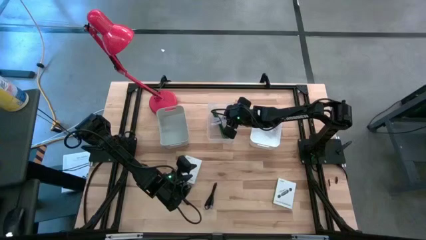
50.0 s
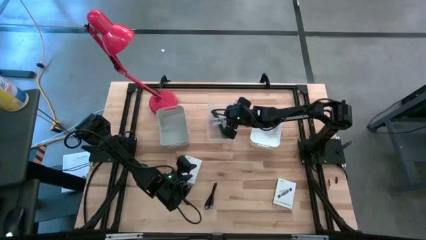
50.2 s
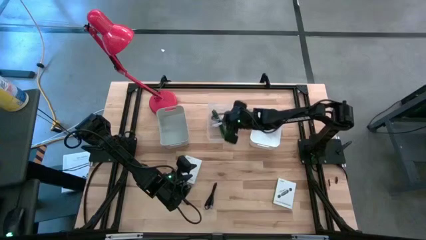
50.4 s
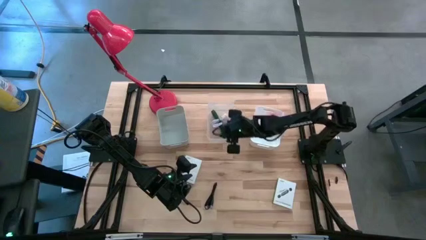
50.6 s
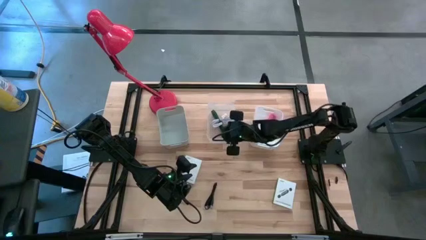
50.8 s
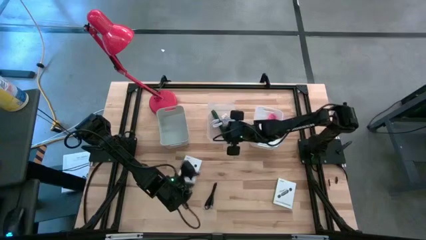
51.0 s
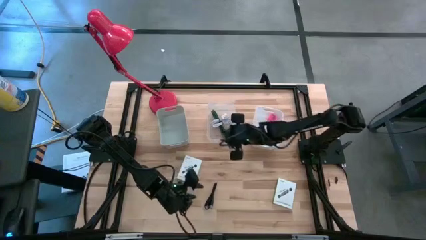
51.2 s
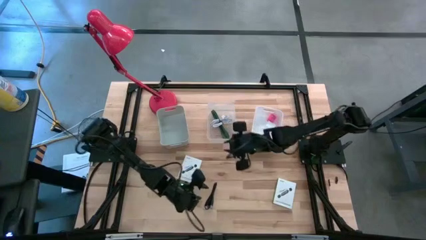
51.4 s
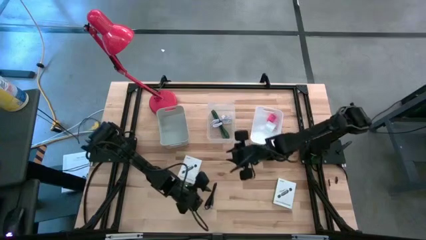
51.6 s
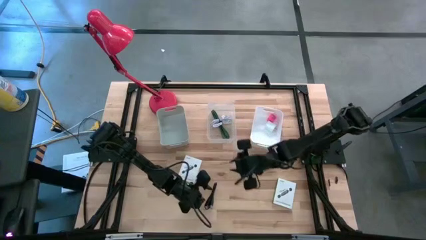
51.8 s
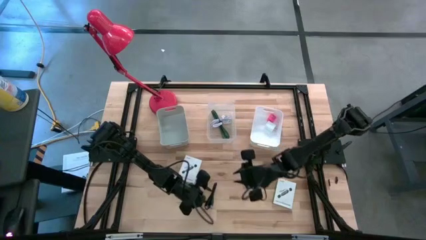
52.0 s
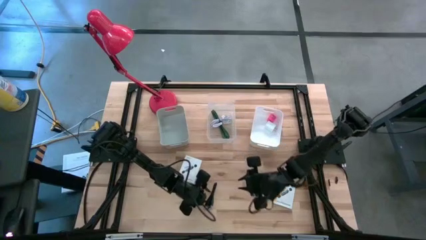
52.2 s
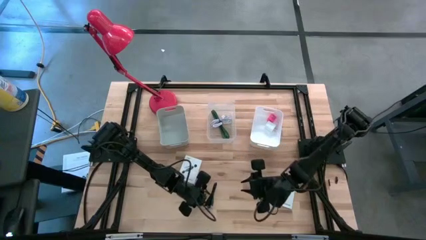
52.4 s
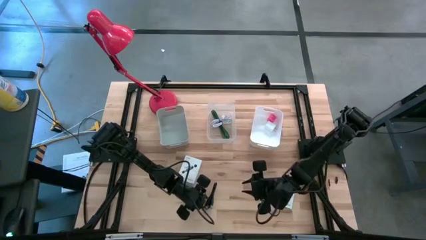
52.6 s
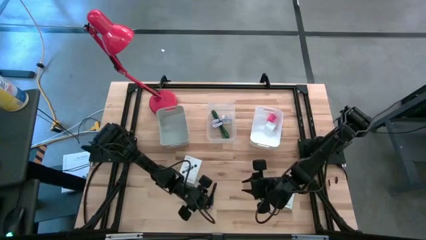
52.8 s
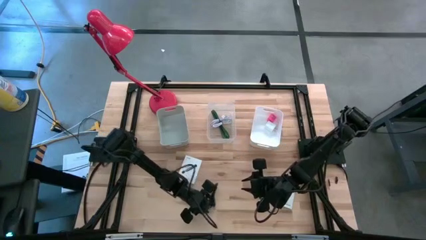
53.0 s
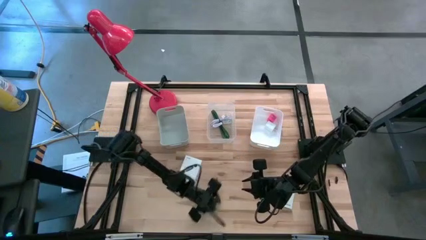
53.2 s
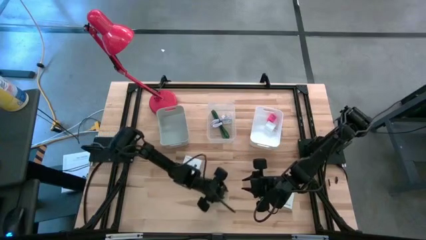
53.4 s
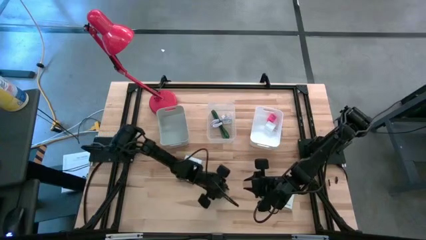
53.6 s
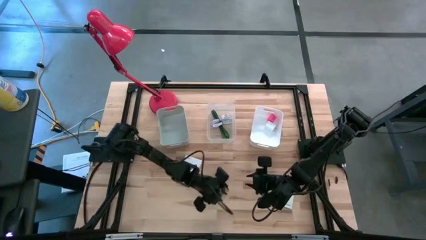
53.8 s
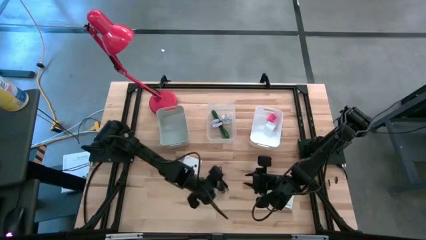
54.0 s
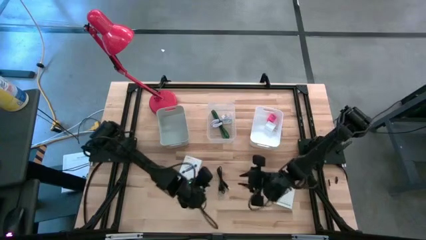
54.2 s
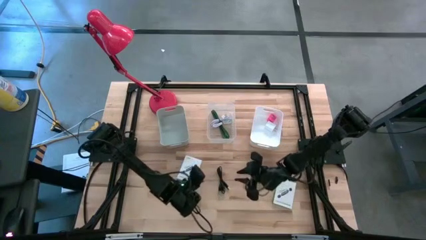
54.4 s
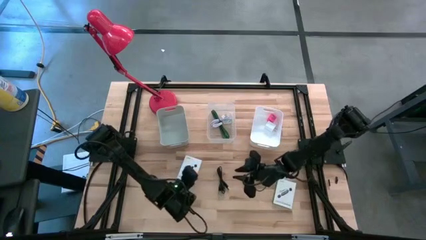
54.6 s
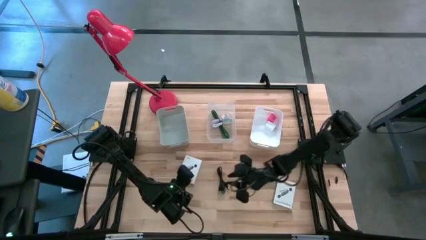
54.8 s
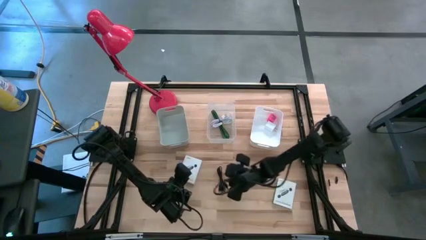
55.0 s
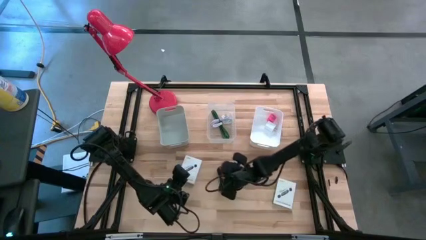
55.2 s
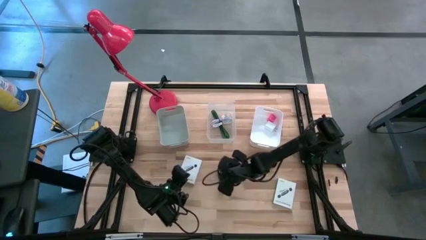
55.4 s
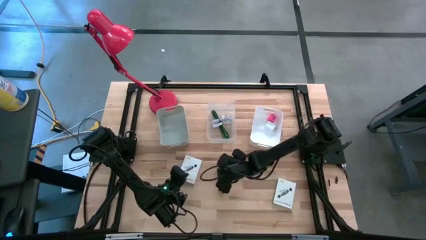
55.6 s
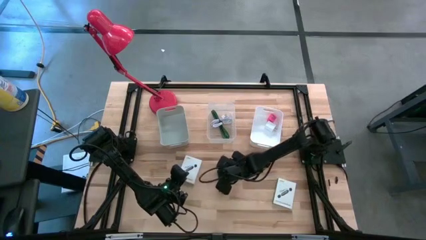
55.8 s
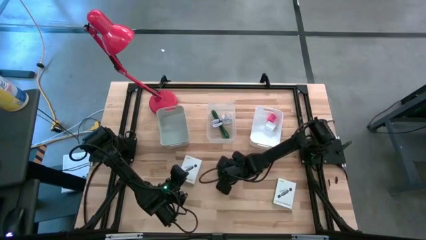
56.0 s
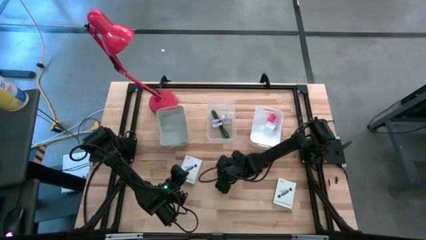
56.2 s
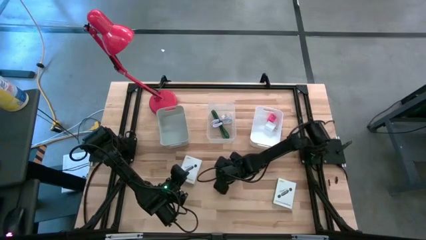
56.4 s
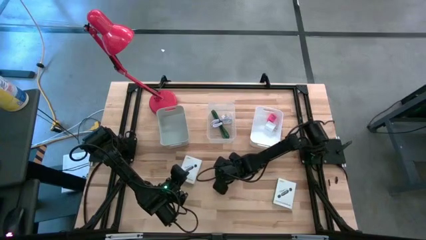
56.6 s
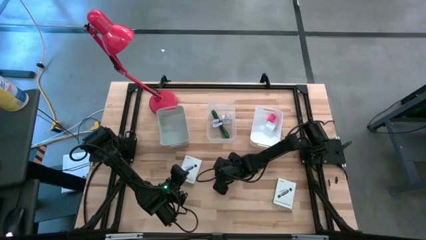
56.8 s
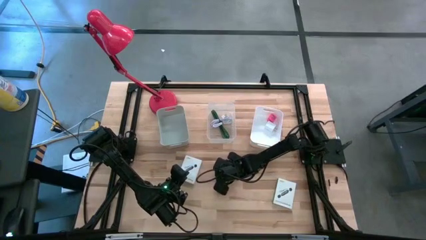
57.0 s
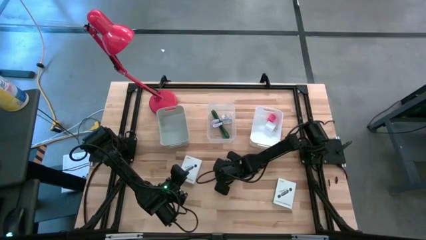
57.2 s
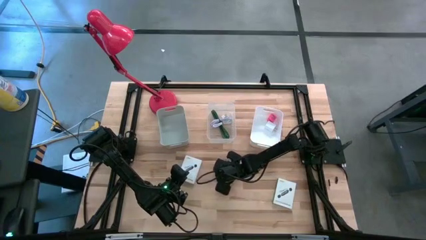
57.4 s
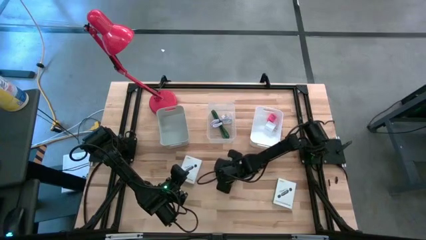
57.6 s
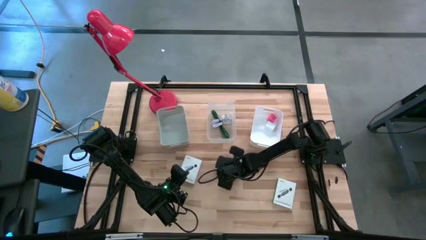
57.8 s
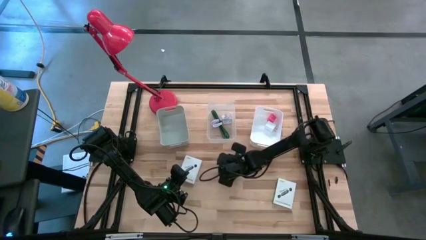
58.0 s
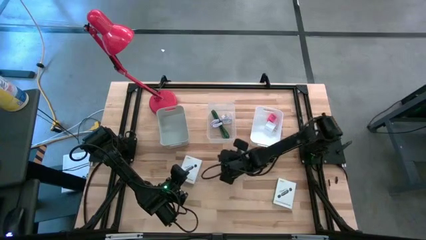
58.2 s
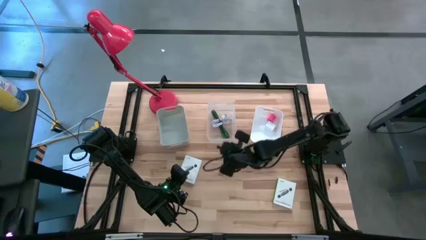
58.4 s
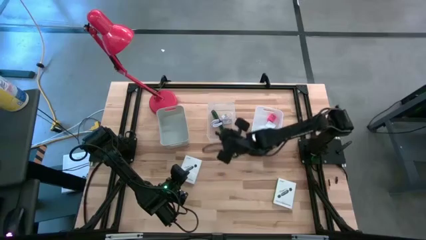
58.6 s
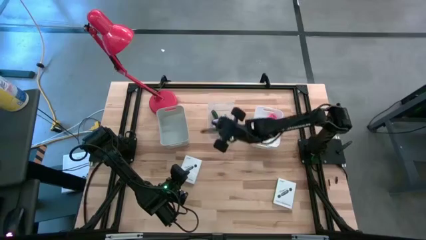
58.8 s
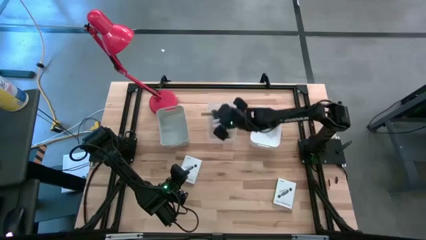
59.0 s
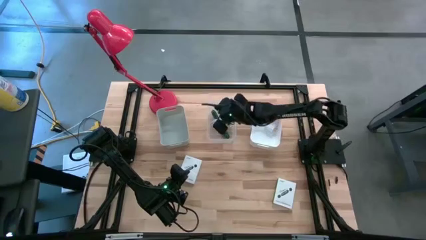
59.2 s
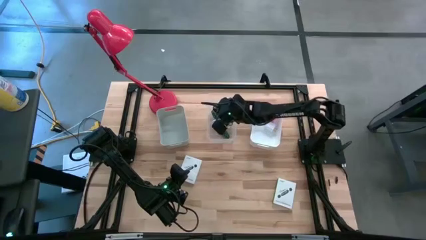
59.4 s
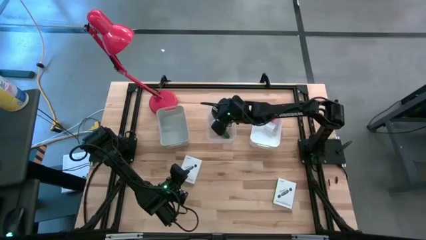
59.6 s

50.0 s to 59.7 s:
Task: Pick and place items into bin
Put the black USB cable into the transparent bin

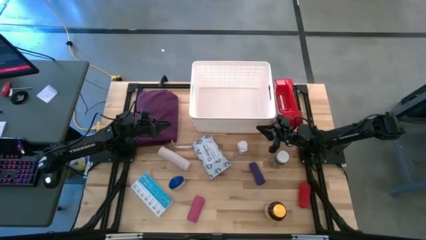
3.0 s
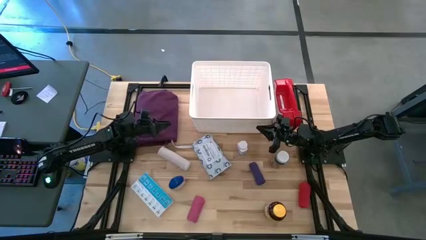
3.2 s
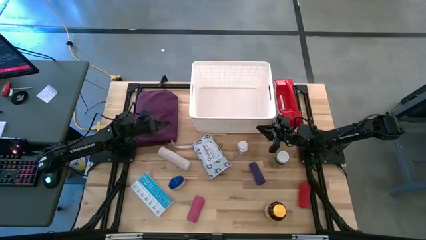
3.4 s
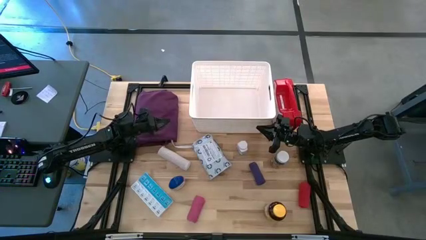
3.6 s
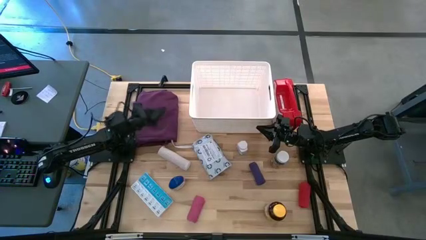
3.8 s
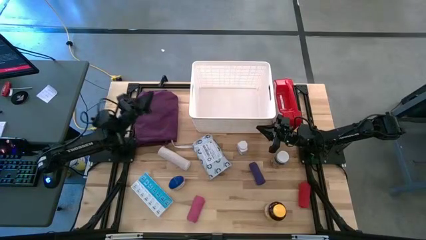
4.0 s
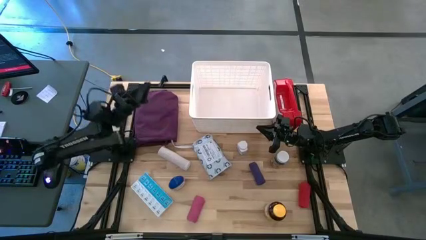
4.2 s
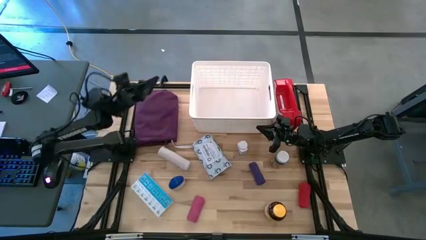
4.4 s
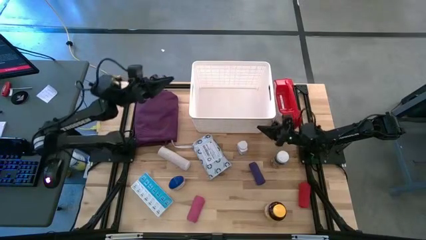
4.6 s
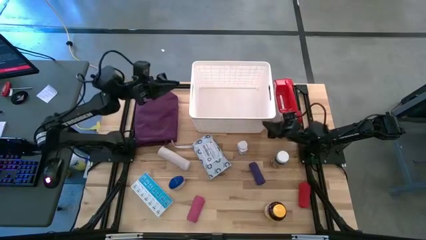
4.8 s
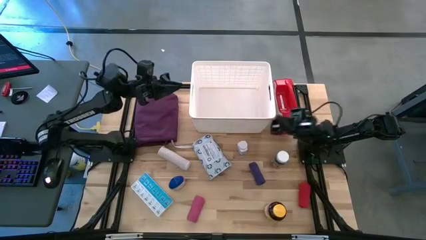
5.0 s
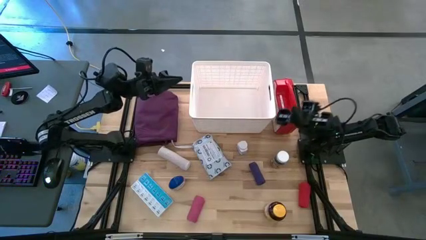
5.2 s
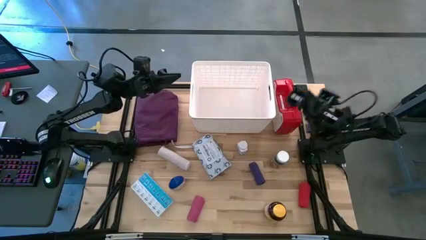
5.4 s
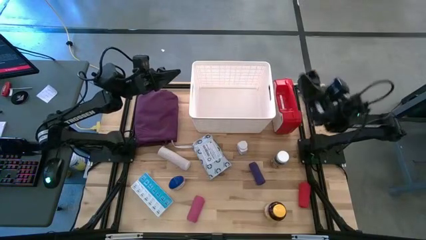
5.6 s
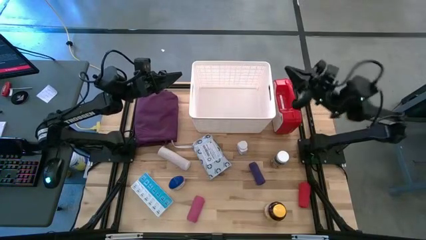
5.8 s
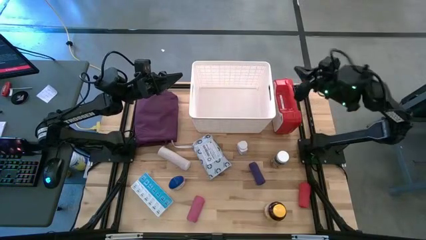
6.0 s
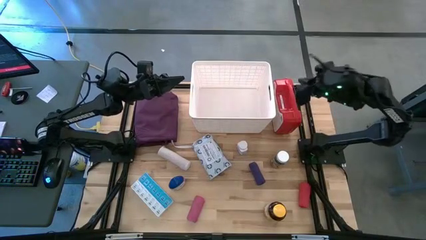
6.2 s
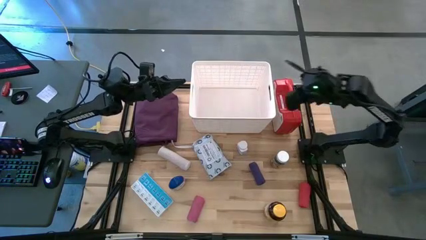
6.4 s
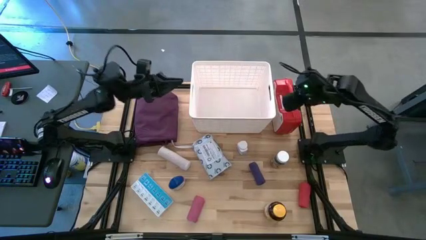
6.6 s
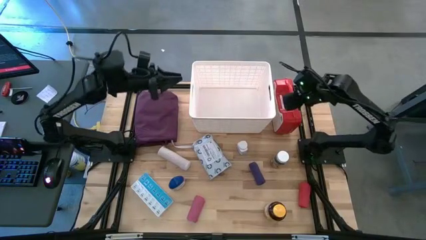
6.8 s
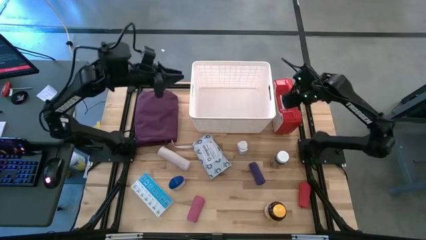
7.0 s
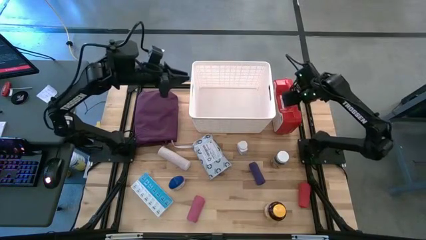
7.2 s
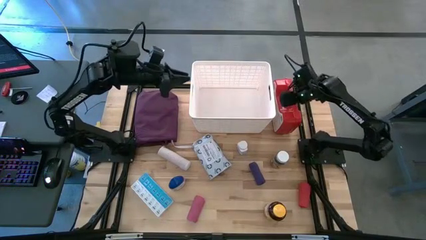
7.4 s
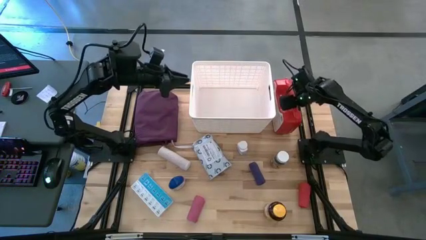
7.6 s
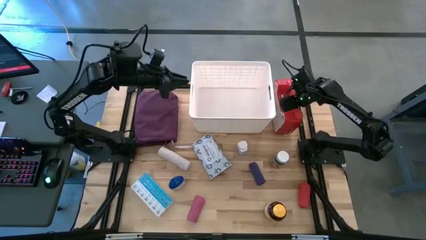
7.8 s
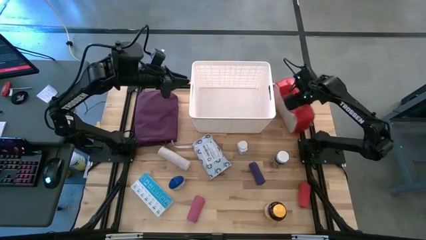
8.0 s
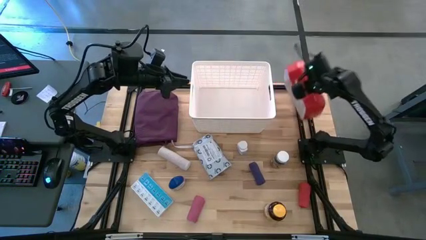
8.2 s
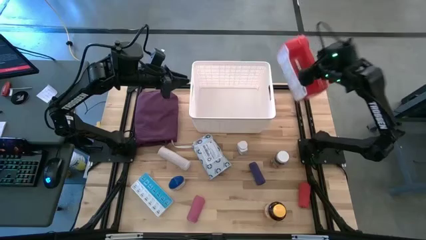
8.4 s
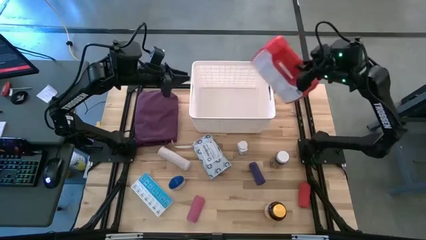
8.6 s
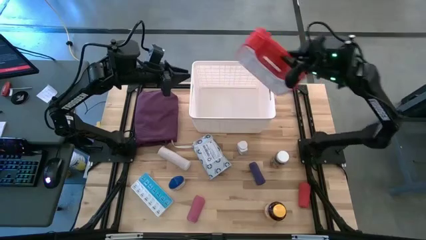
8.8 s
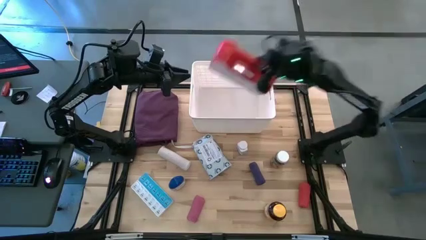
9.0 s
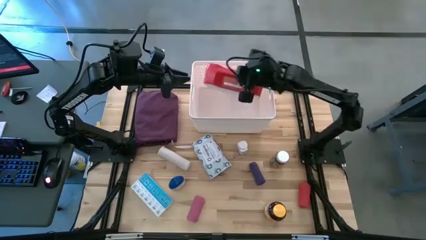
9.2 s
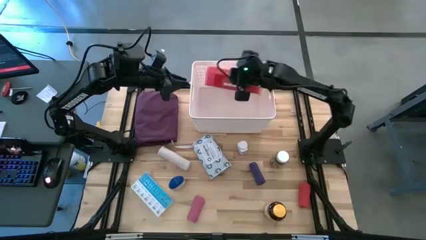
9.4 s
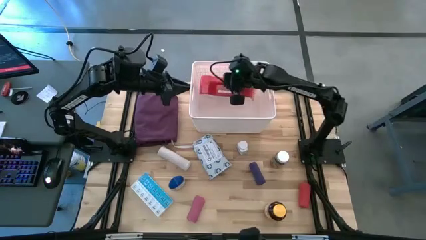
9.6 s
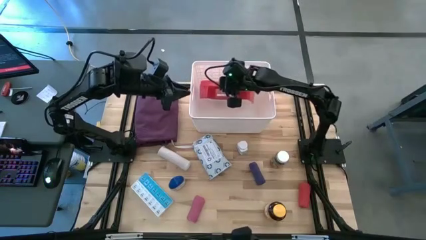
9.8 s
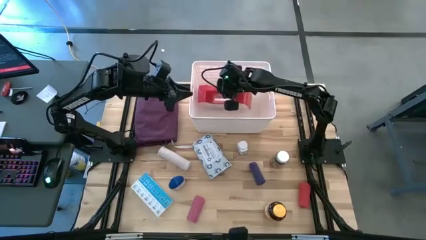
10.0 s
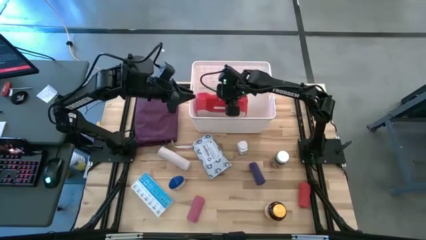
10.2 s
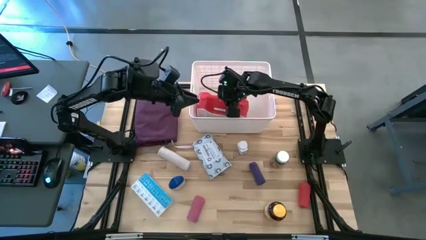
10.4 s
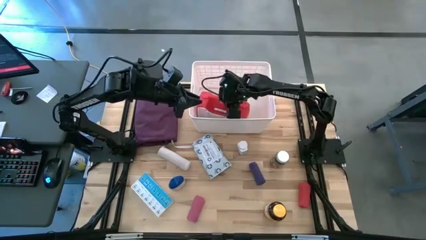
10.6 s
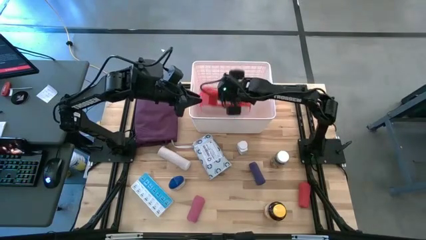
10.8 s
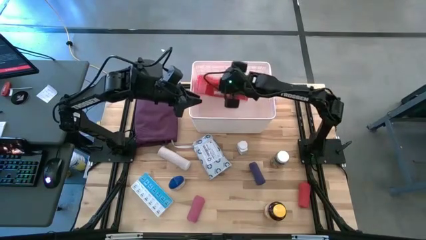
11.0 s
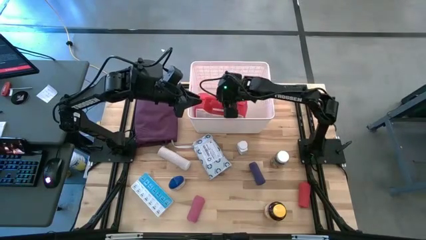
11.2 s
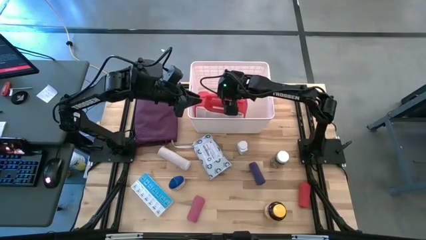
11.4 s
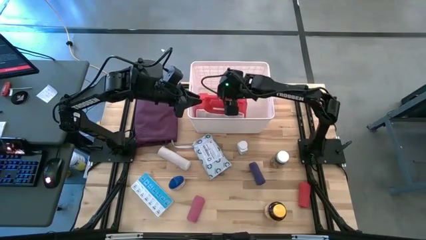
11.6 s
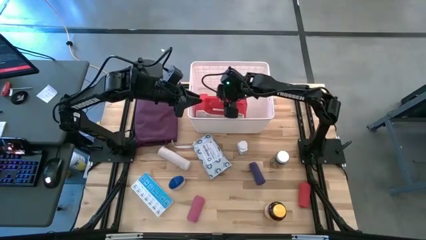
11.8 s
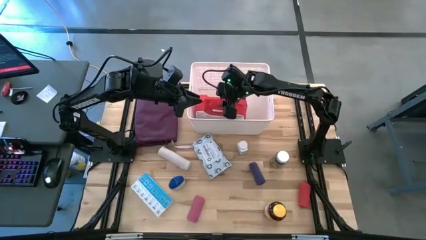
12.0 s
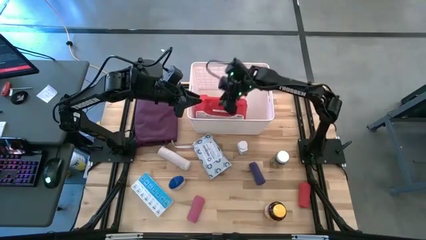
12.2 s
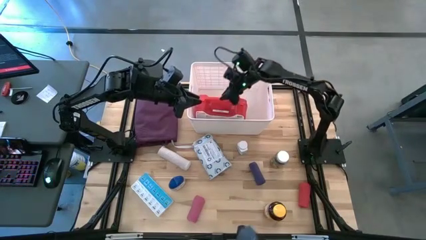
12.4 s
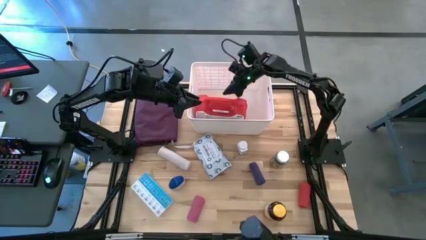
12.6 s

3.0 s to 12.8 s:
Task: Pick & place medical supplies in basket/bin
Put the red first aid kit into the white bin
